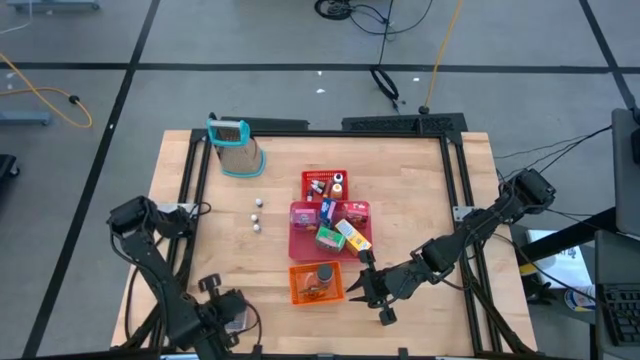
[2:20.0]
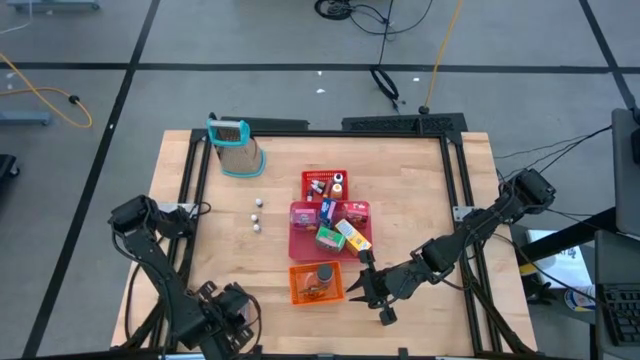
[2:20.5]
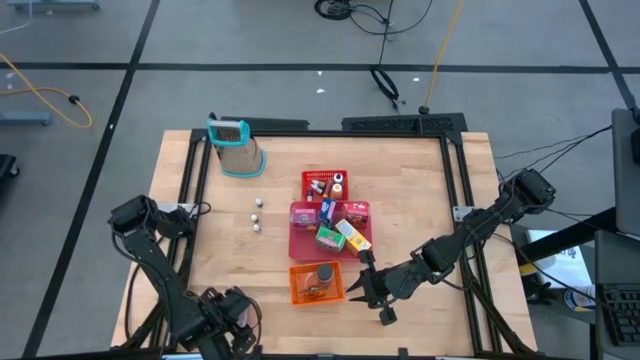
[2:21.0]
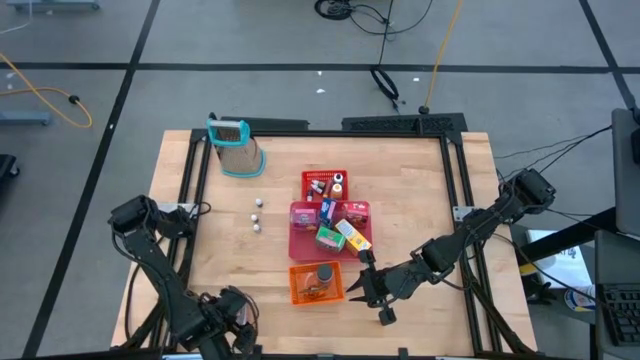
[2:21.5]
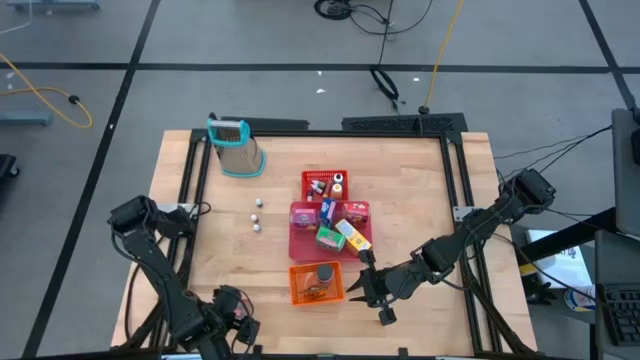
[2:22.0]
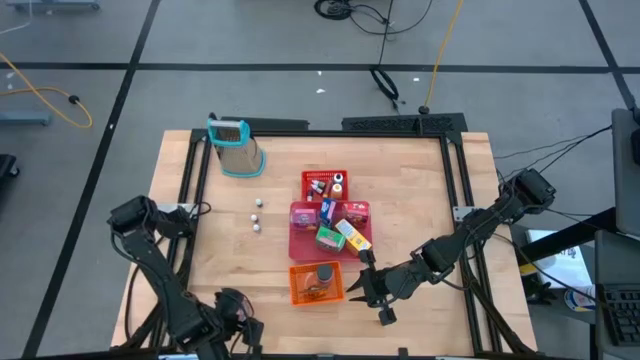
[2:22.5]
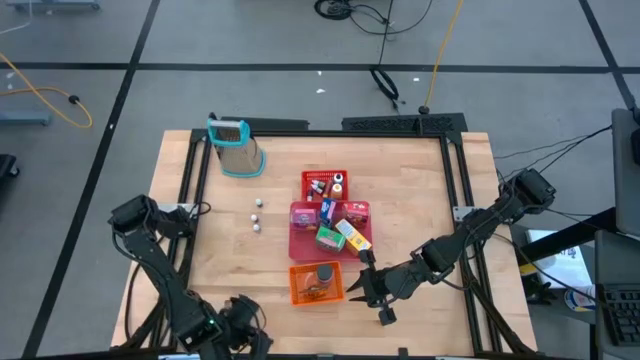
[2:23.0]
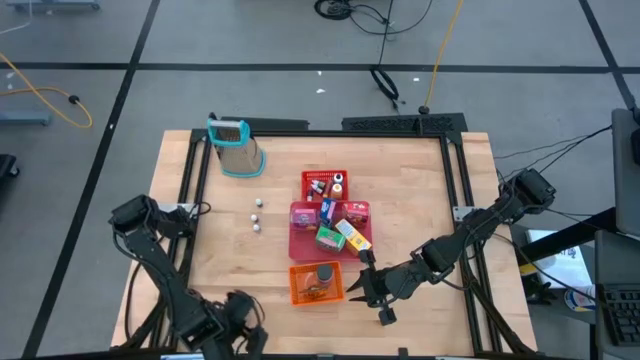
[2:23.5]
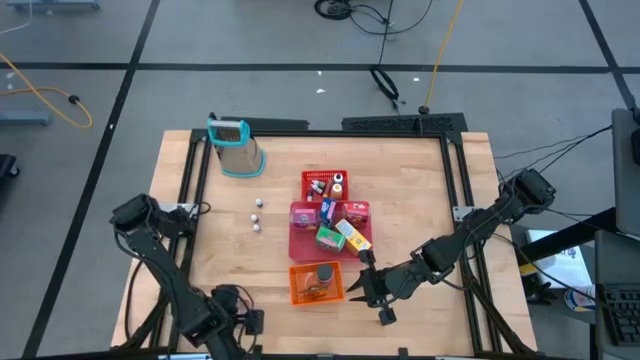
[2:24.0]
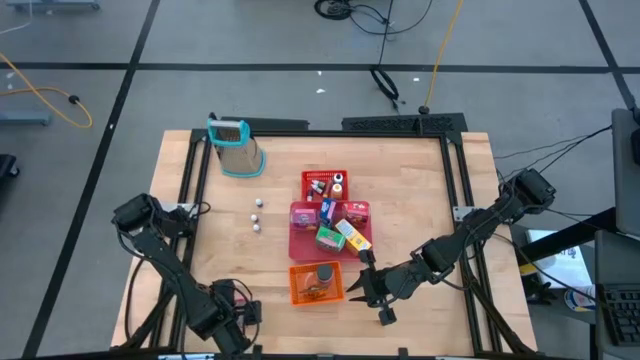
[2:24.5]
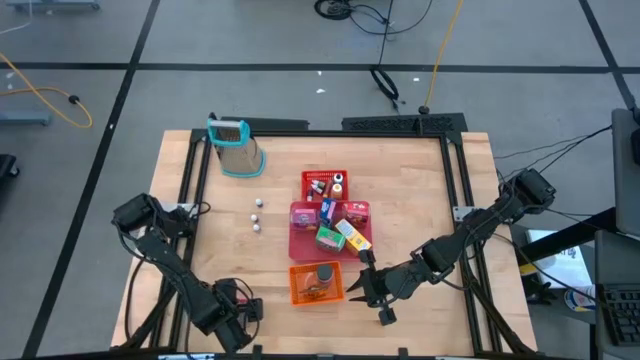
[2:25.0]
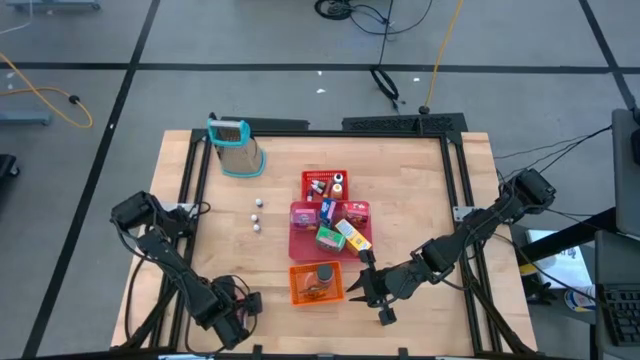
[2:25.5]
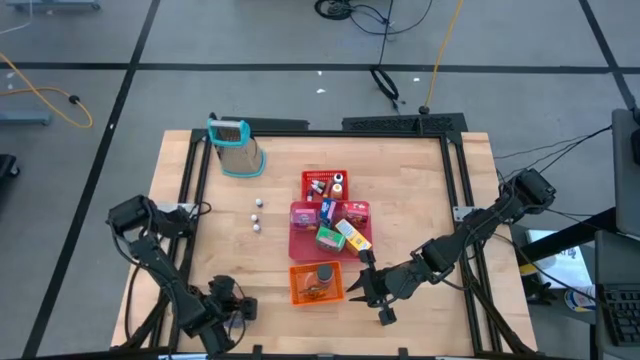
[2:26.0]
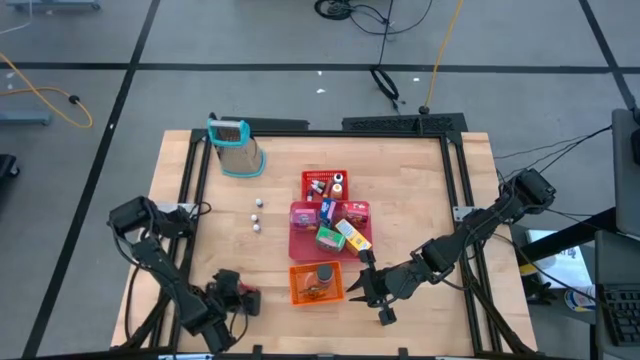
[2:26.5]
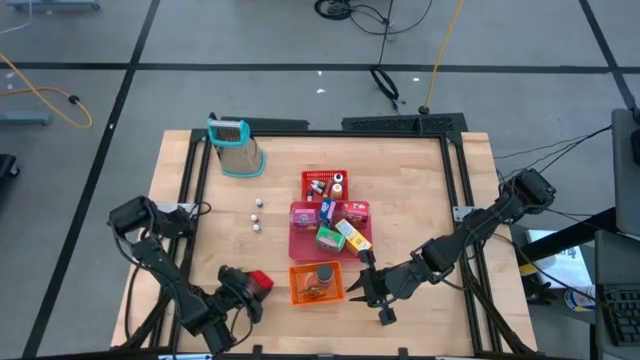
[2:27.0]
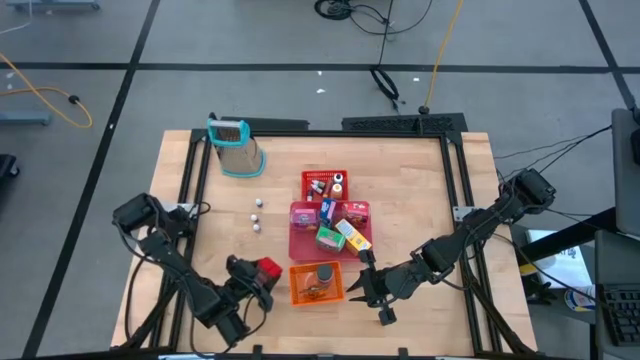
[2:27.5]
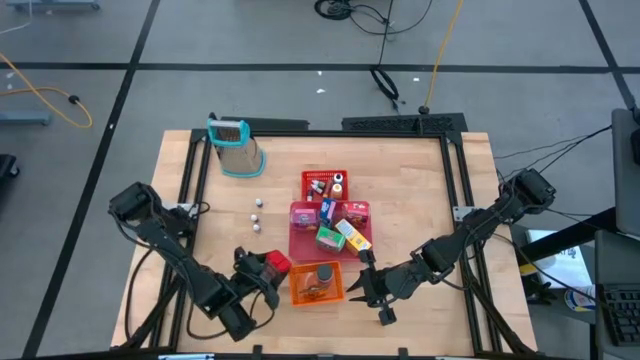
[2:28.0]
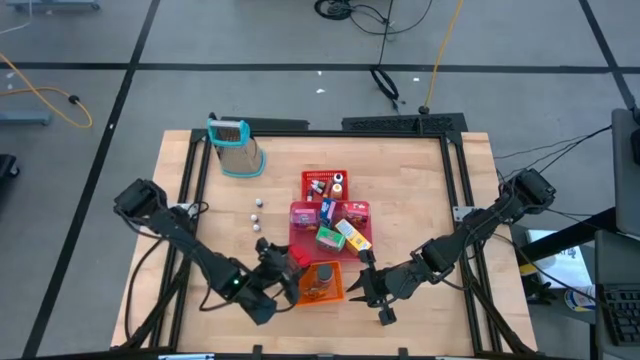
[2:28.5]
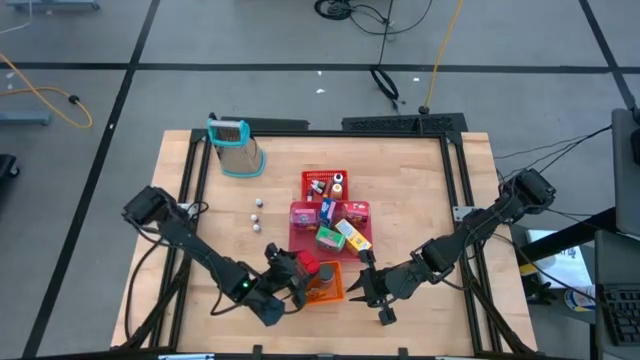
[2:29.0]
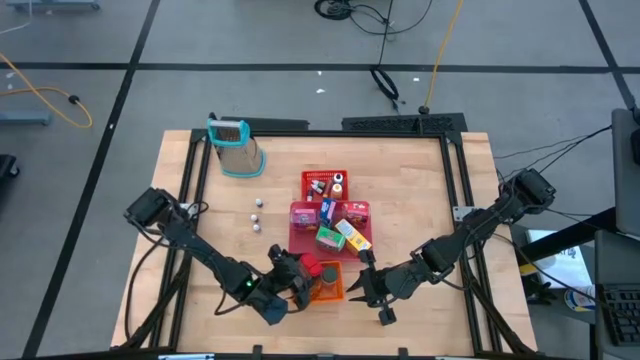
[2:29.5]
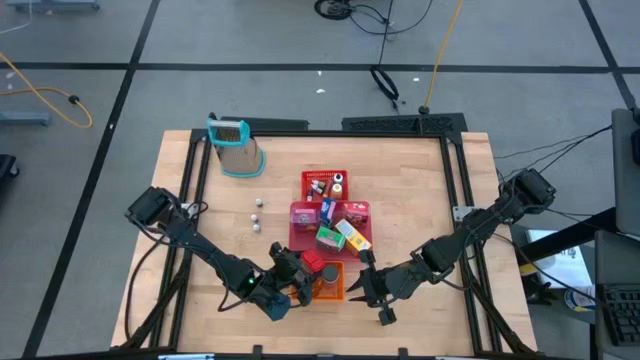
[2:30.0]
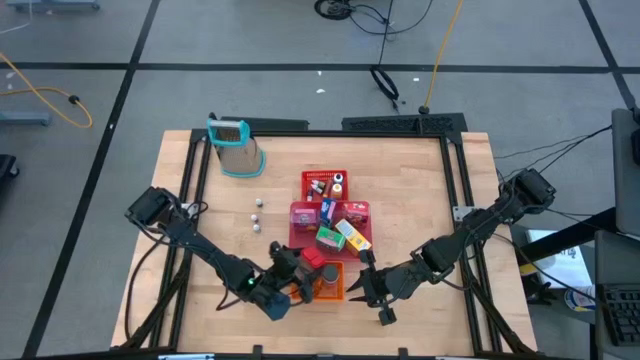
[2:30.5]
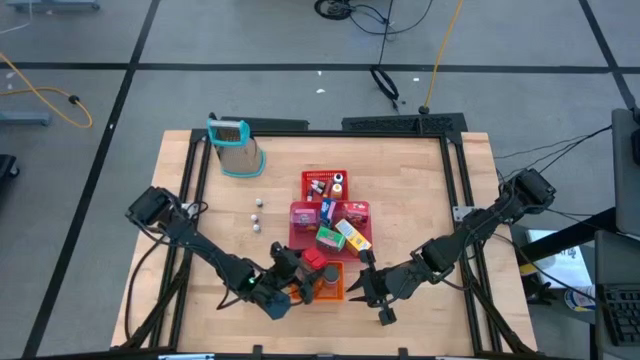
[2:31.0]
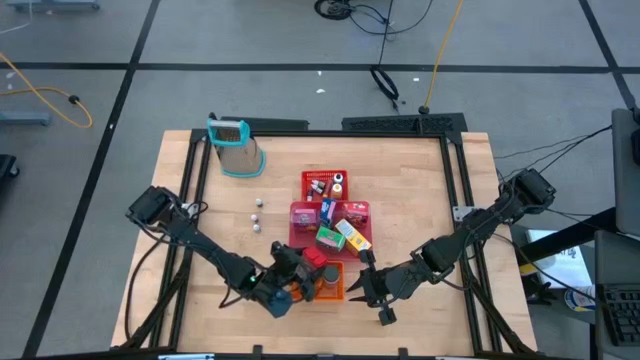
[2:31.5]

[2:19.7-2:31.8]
Task: Pick & Place Kitchen Items
Put the red seasoning can into the orange bin

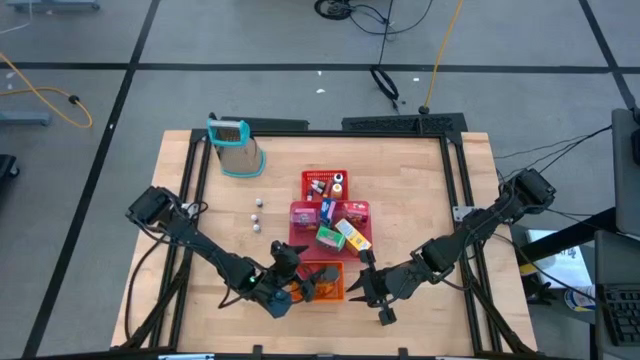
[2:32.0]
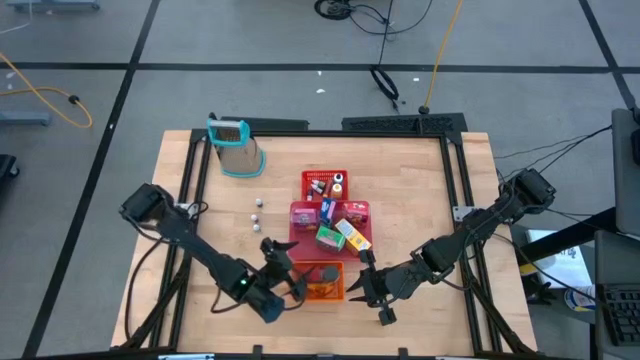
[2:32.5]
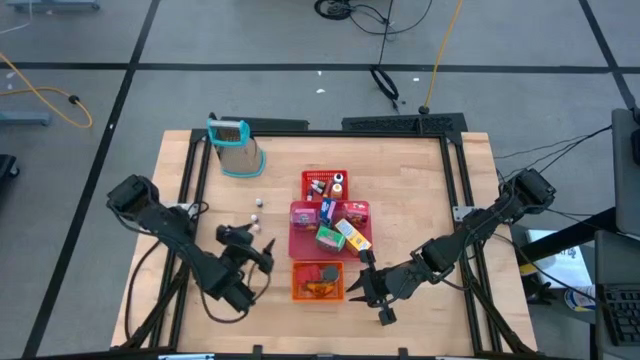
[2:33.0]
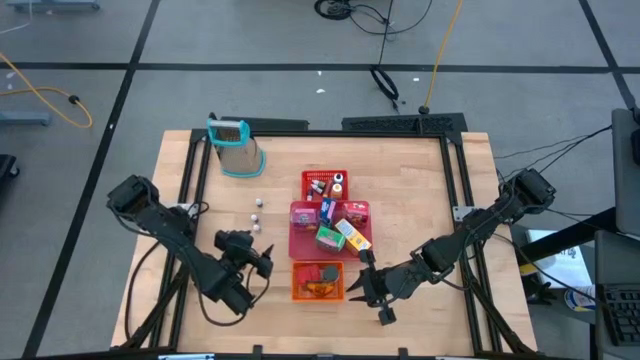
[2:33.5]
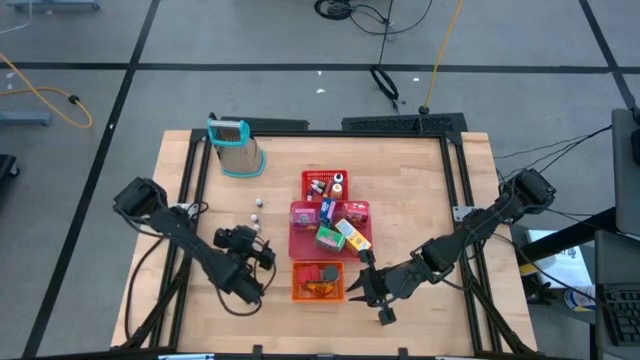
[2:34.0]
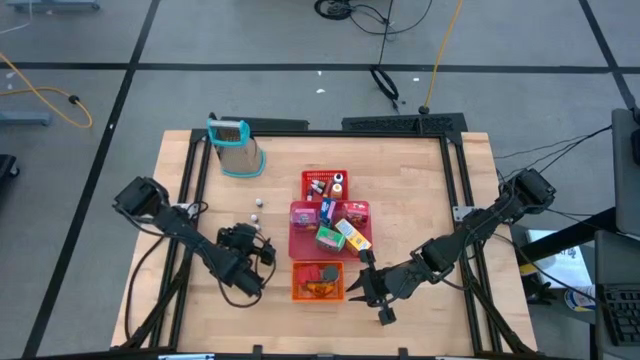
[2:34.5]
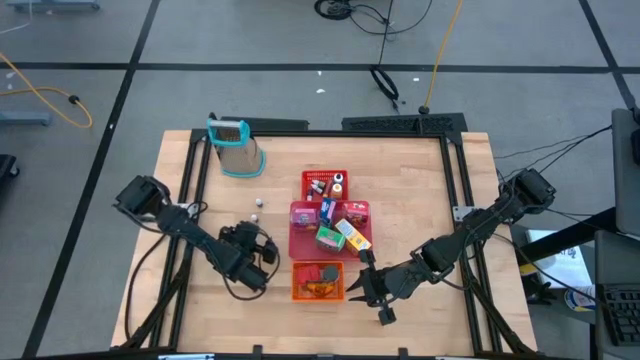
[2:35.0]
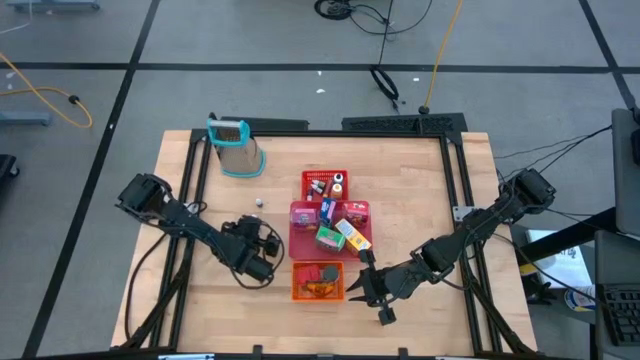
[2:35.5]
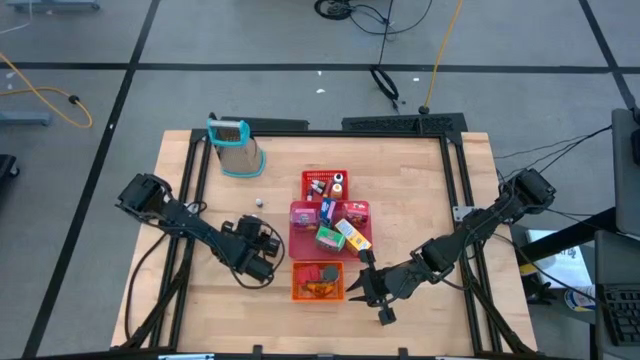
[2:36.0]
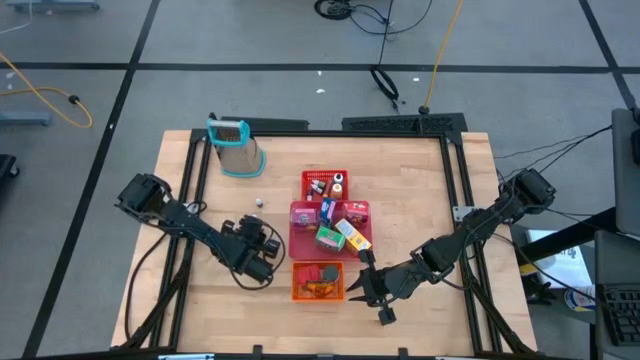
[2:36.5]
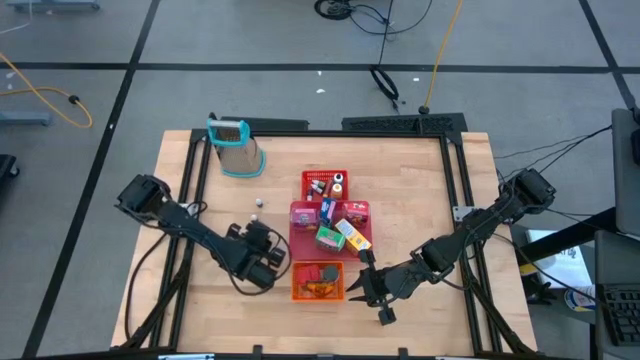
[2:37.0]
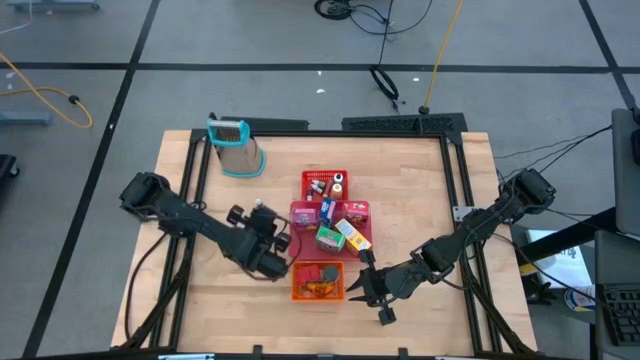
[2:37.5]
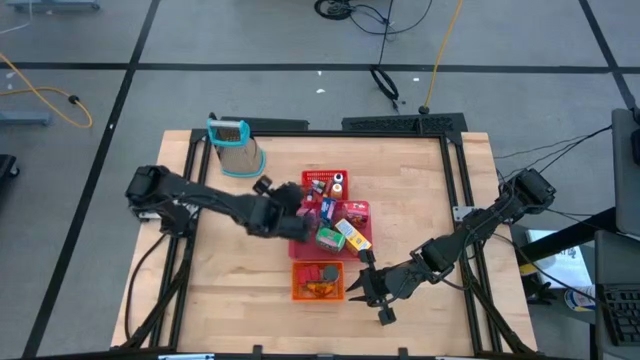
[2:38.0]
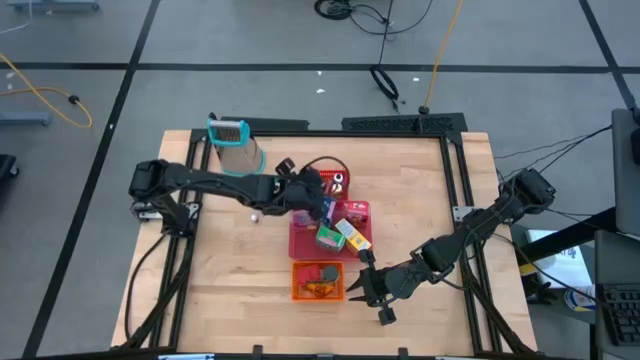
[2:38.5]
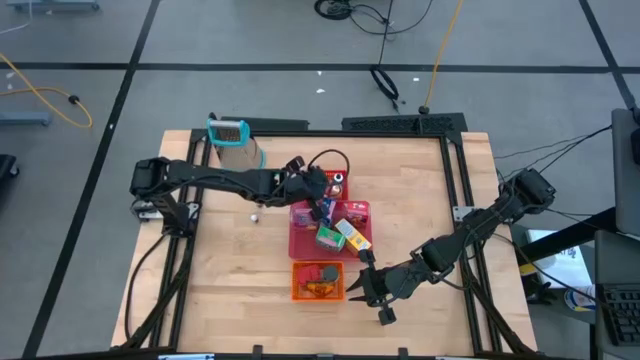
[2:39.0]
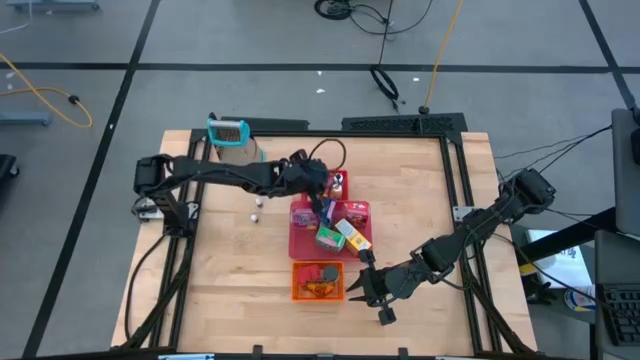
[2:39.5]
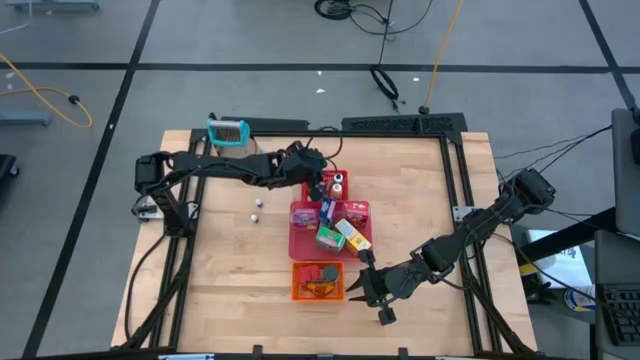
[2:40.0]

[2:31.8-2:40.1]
Put the red food coloring bottle into the red bin
